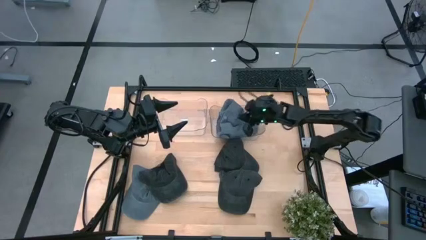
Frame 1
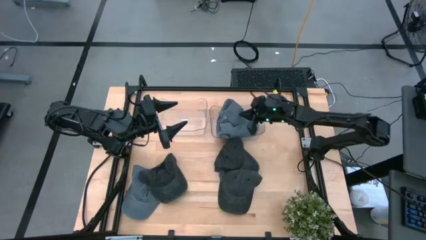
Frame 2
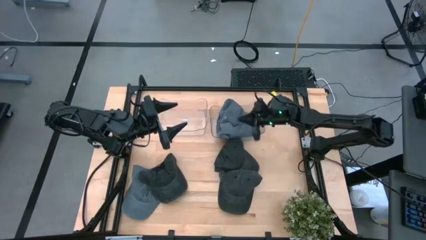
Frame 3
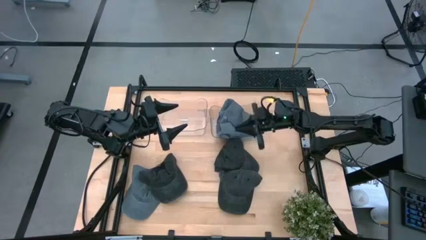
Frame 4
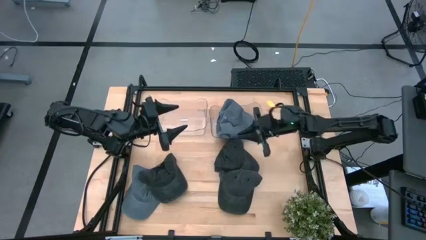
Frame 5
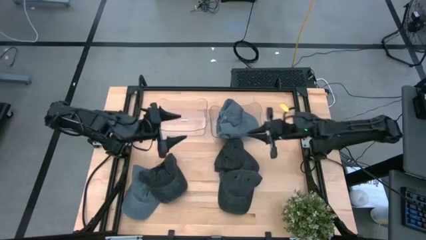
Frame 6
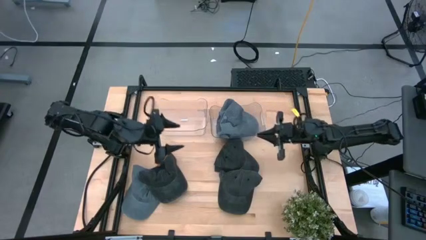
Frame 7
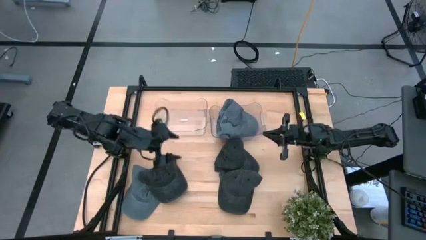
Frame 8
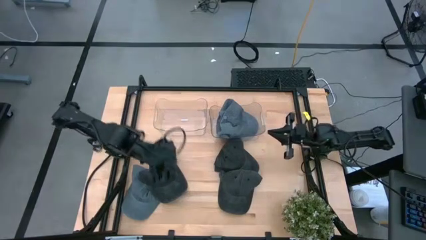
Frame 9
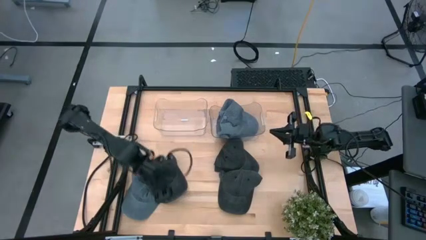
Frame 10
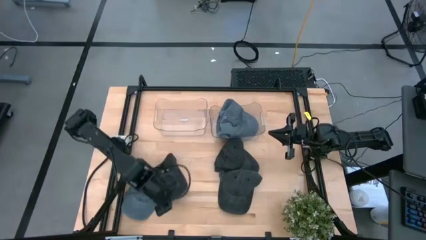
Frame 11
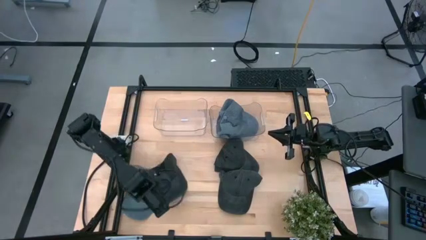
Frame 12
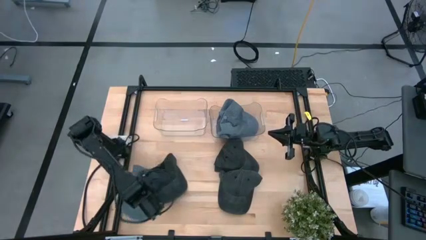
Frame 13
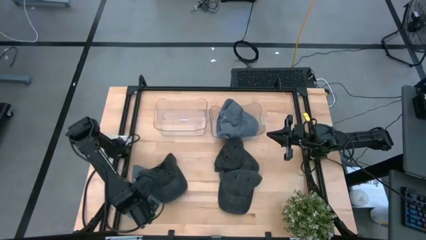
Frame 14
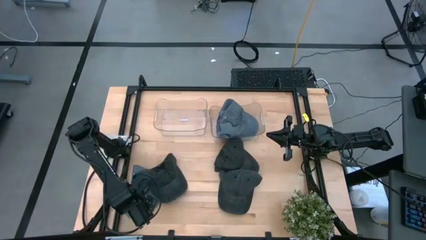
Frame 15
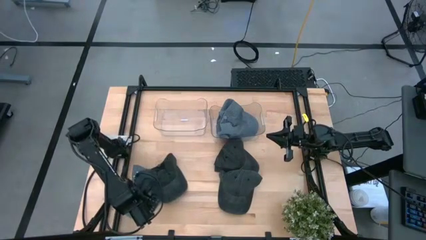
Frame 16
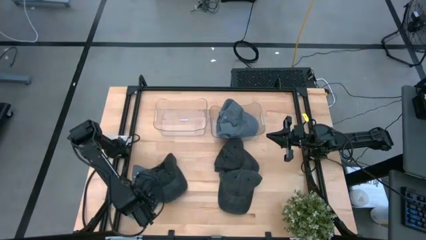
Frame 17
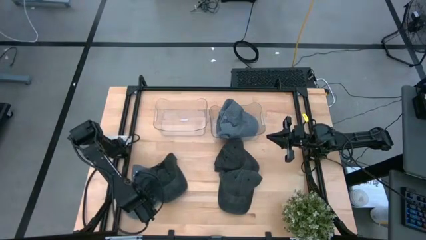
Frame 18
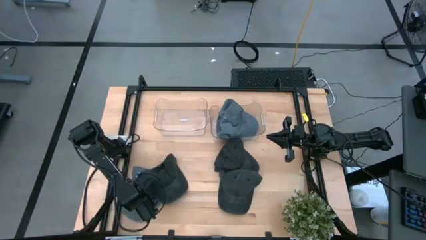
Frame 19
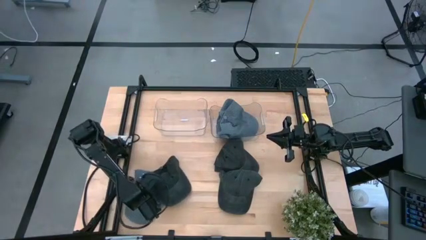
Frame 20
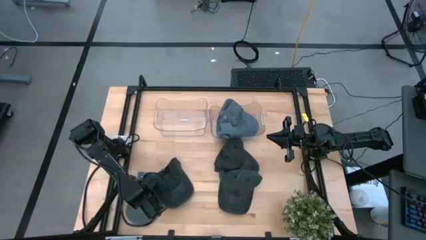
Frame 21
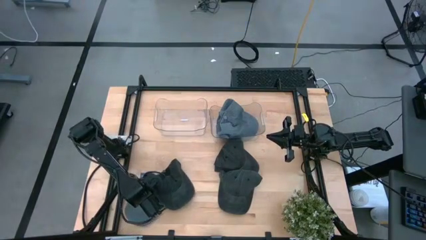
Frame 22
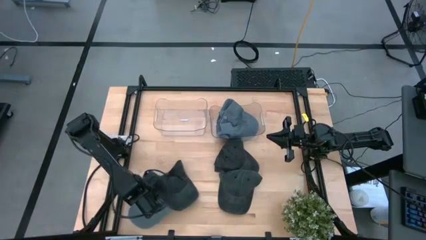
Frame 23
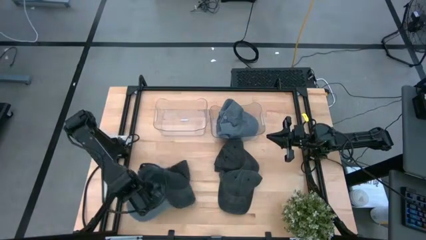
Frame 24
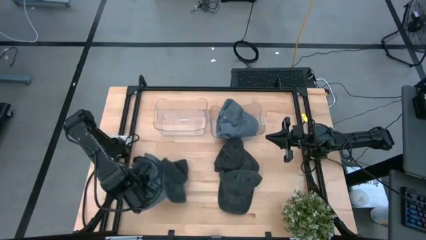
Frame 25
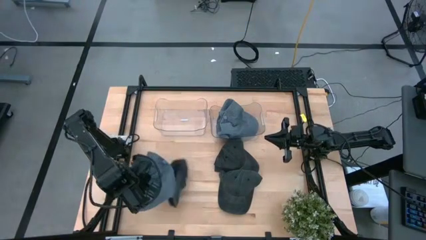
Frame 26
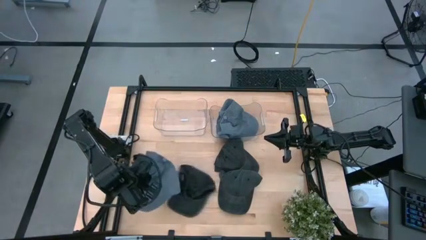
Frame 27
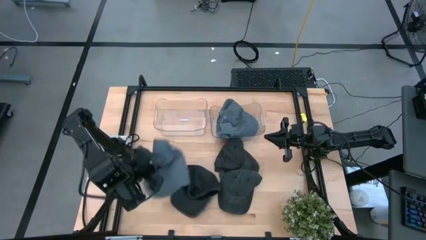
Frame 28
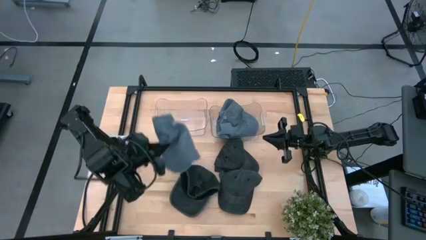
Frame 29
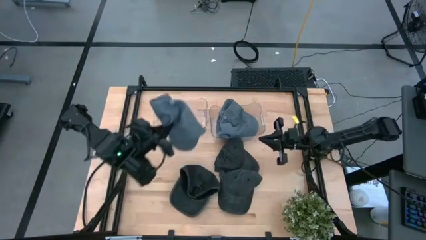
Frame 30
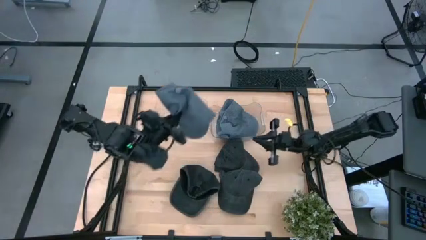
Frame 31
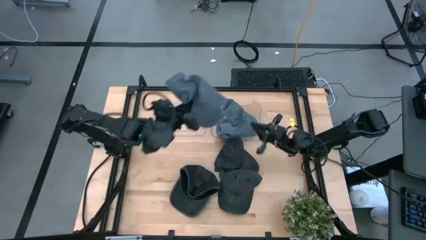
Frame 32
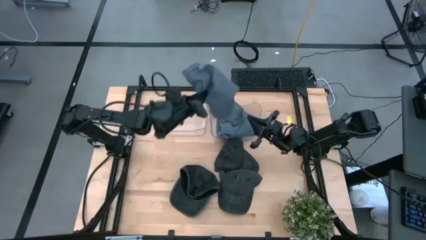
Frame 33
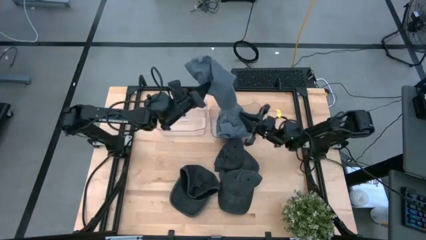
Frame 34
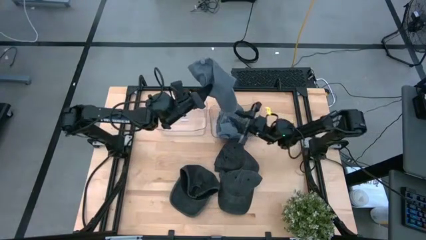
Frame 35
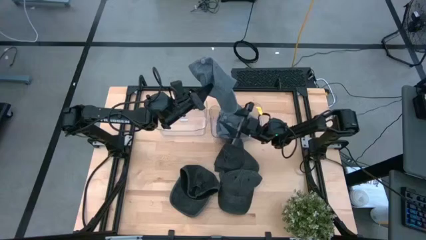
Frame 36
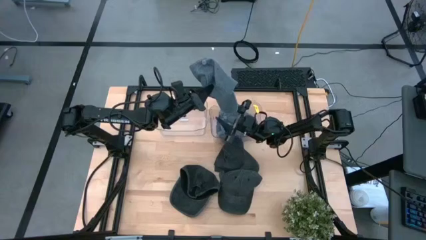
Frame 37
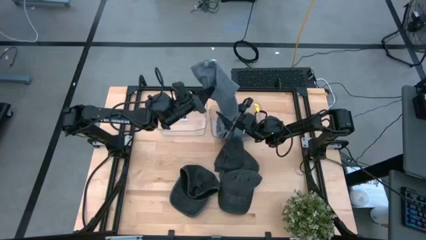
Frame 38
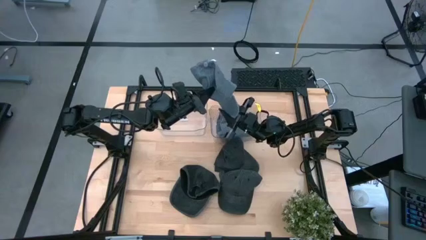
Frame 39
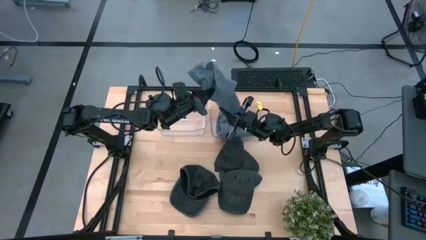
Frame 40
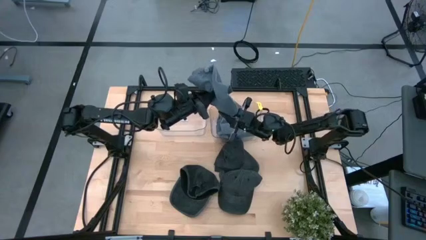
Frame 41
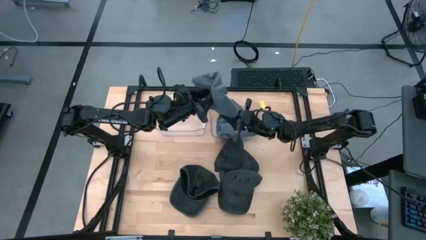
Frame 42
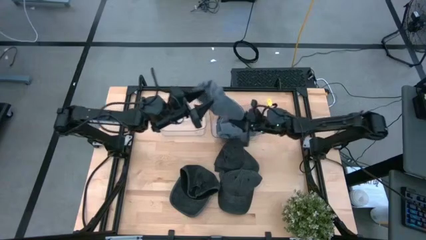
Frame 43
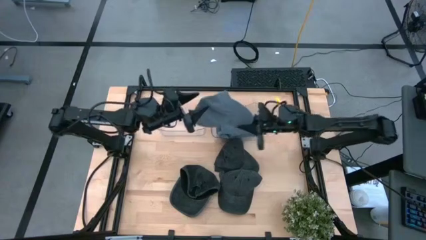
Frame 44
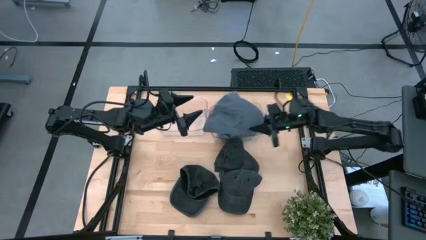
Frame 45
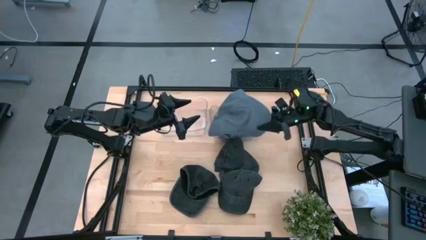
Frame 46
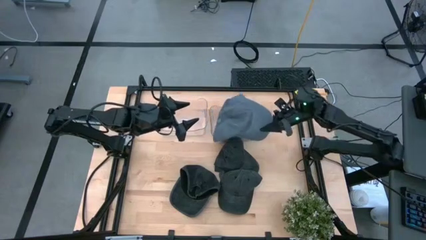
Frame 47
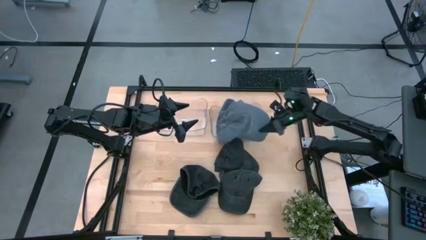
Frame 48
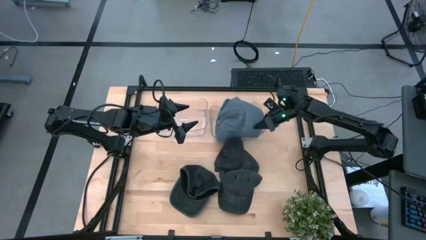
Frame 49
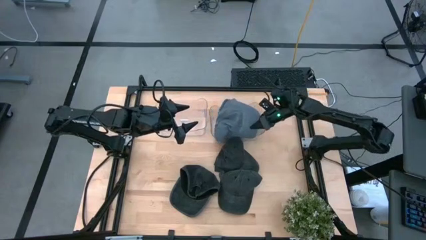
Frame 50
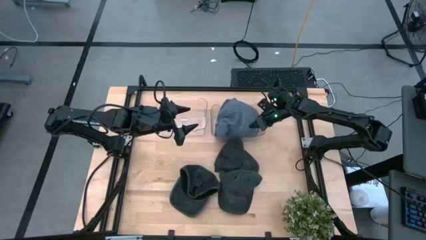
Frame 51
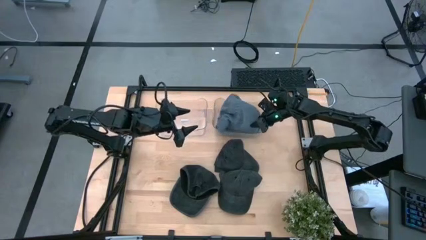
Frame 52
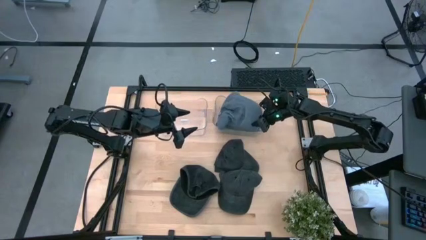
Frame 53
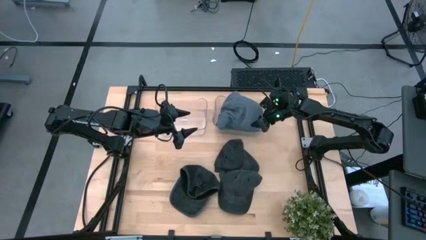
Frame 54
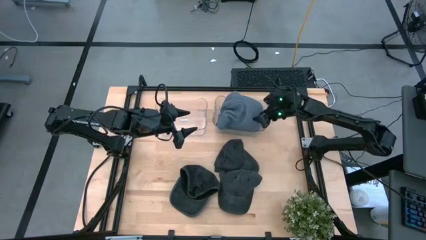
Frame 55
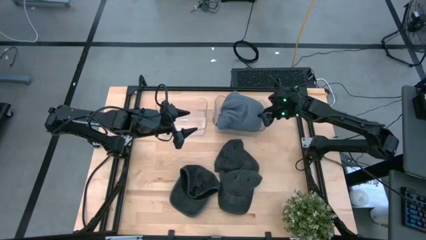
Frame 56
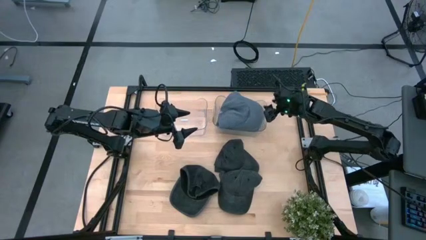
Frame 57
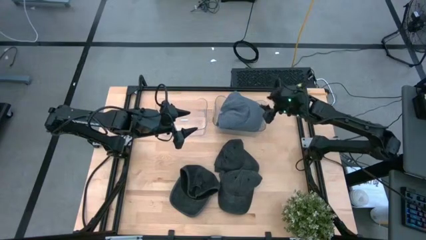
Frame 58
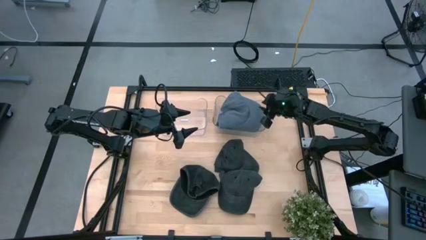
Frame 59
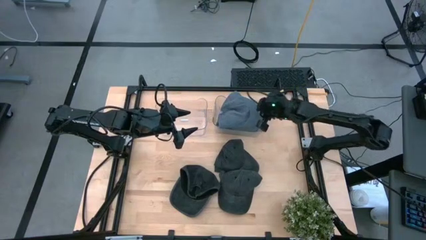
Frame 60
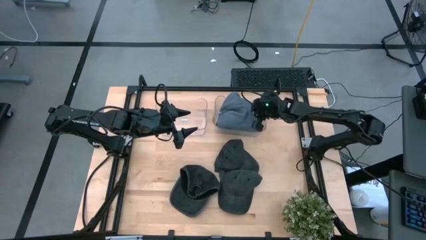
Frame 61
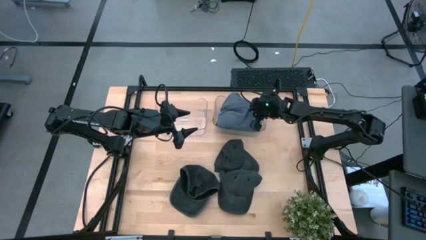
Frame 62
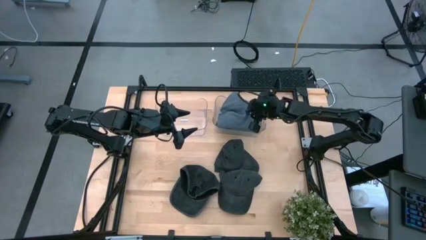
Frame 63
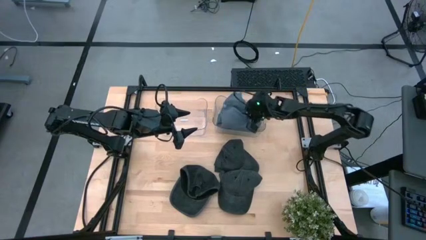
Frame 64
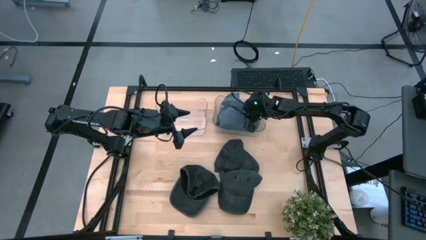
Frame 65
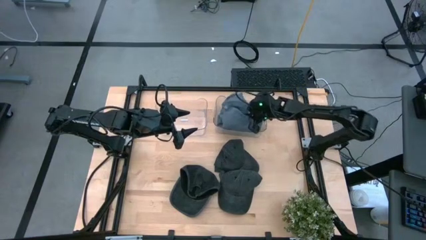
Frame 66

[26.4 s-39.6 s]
Task: Pick & Place hat
Put the blue cap into the right transparent bin

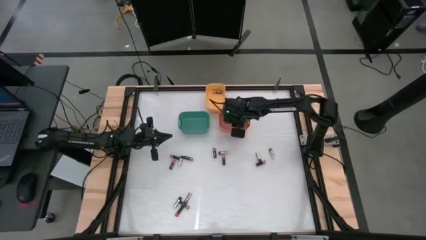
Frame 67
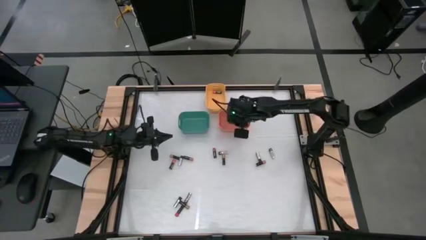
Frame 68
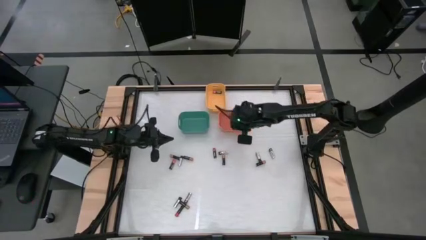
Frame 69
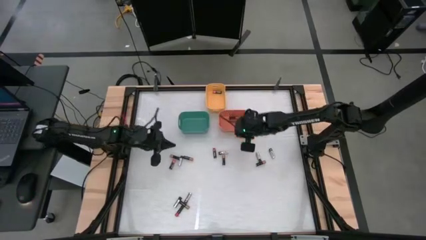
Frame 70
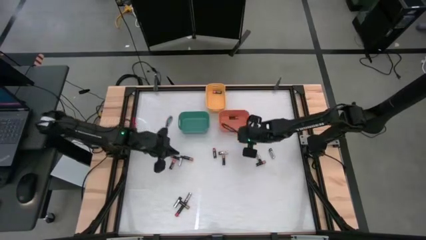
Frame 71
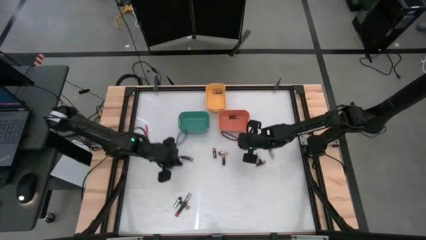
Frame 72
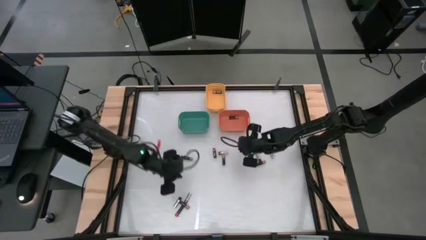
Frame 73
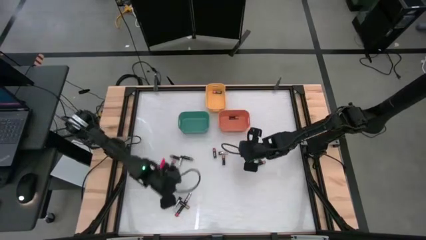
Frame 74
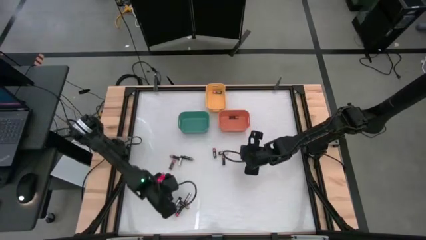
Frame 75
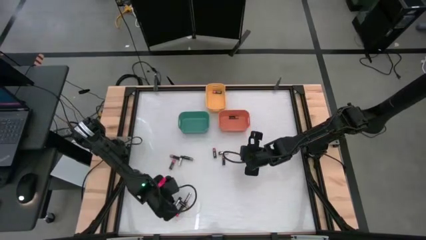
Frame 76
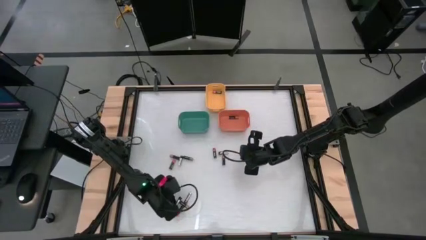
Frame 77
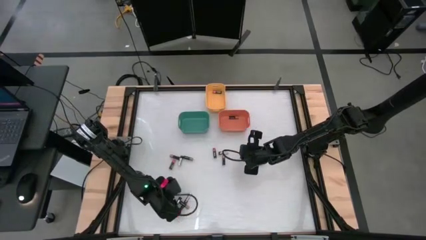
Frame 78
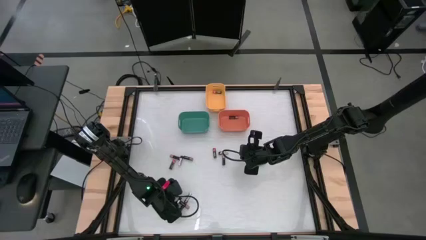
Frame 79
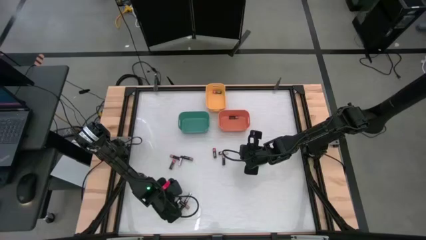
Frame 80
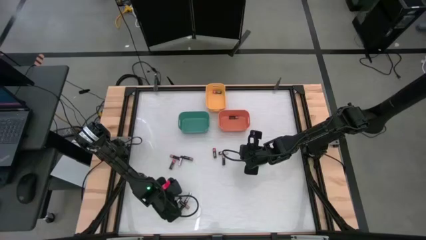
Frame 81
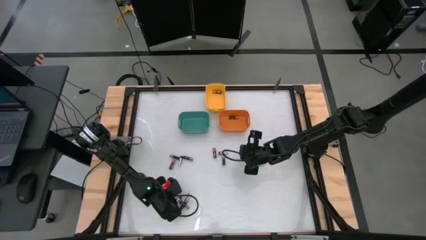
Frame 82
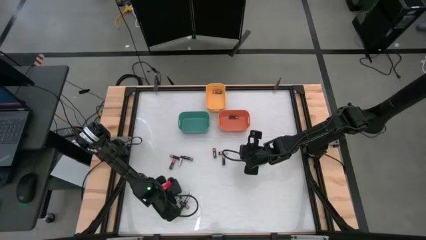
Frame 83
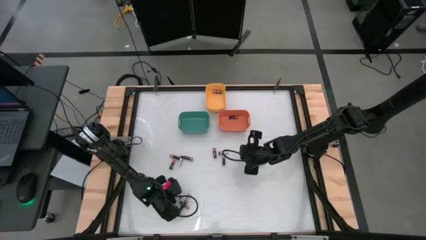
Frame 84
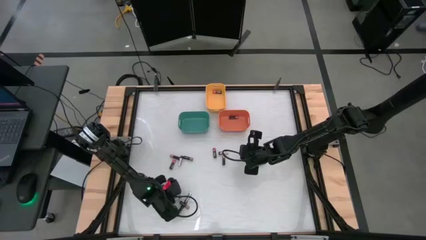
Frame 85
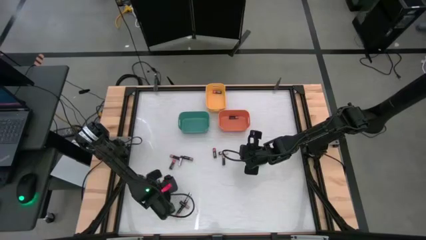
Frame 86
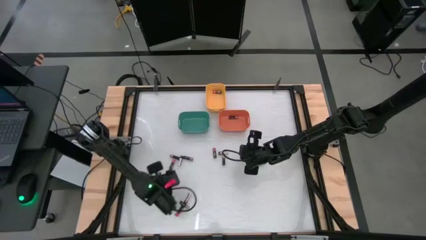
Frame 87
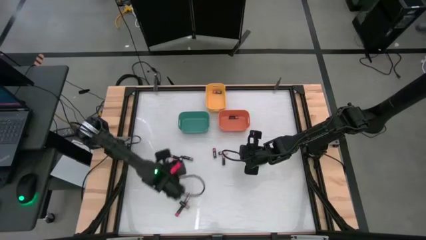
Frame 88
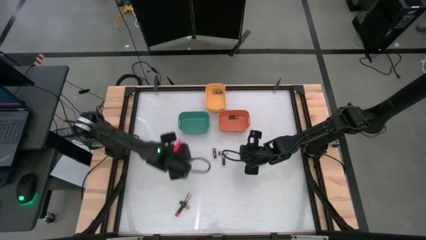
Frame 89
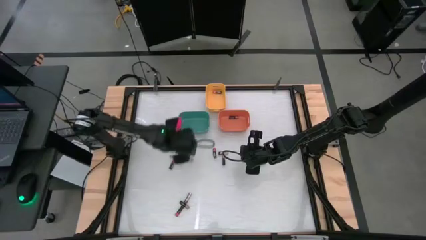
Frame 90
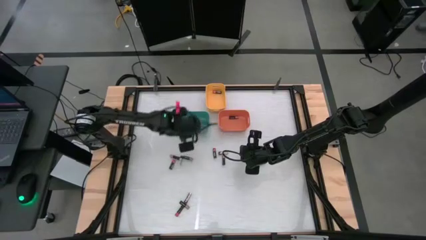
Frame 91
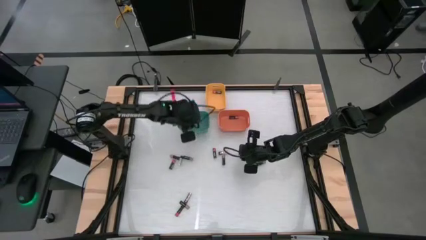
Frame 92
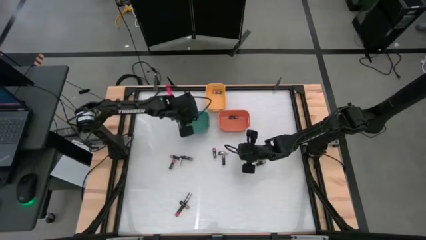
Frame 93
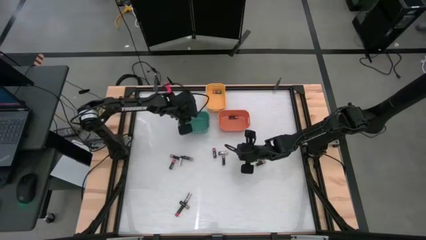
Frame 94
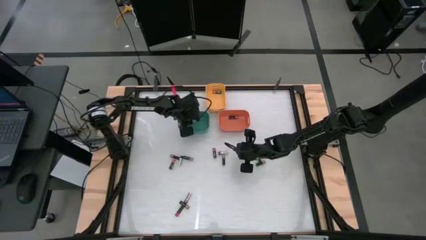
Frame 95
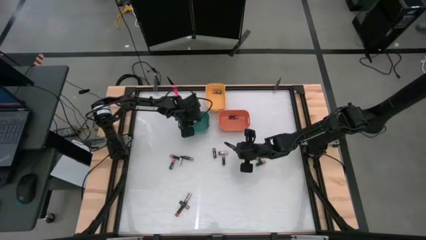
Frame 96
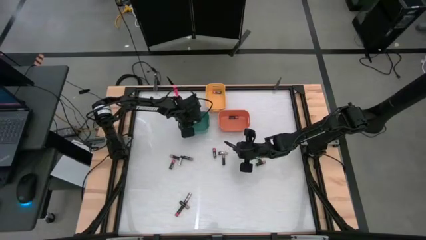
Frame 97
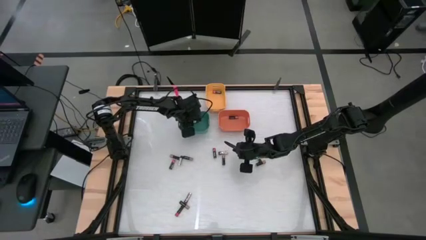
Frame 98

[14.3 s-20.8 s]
Task: Sort batteries
Put the silver battery into the green bin
